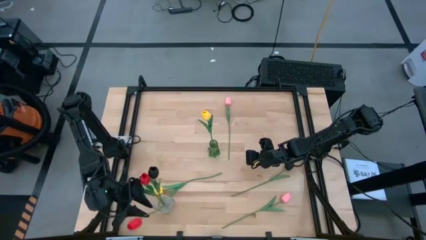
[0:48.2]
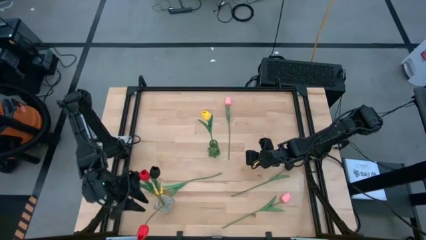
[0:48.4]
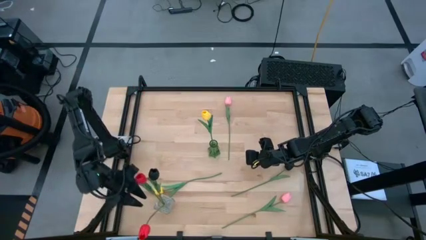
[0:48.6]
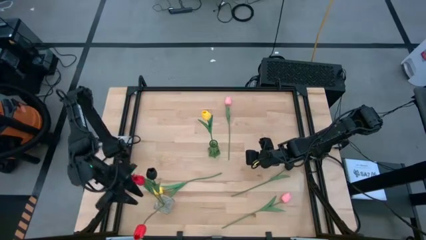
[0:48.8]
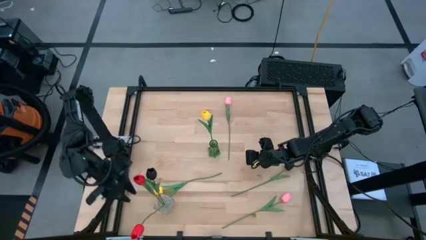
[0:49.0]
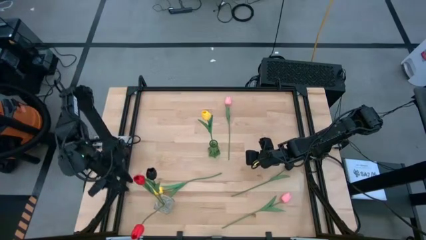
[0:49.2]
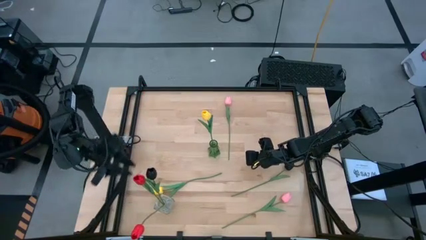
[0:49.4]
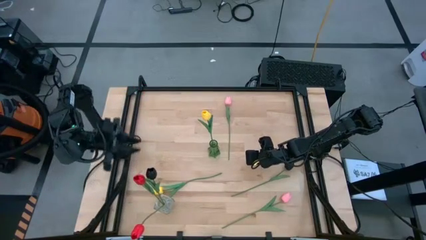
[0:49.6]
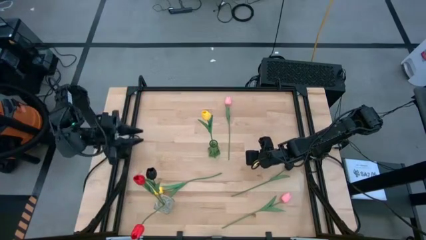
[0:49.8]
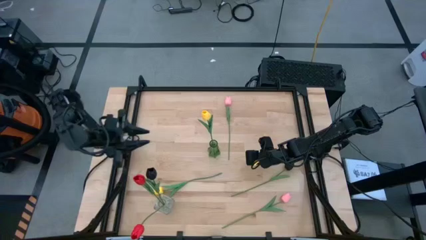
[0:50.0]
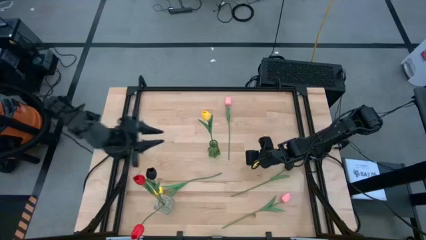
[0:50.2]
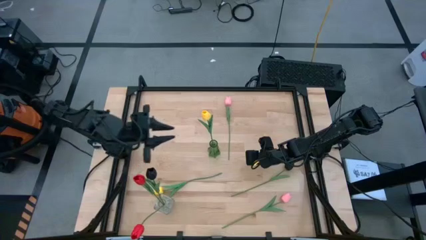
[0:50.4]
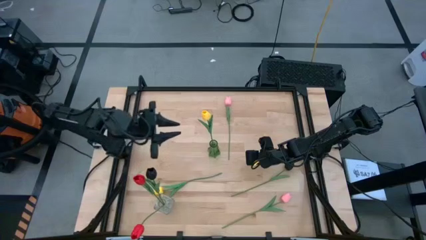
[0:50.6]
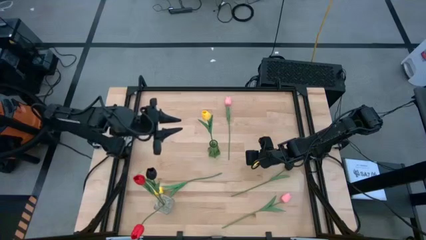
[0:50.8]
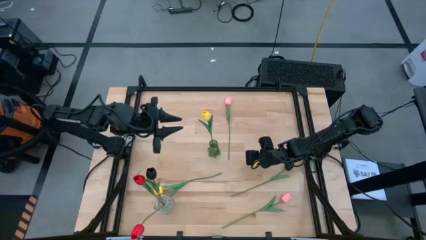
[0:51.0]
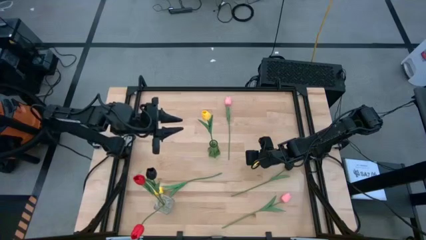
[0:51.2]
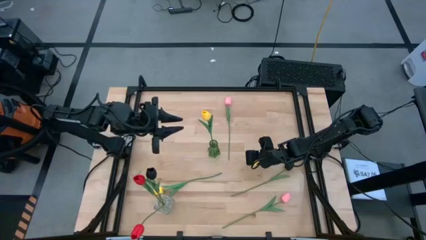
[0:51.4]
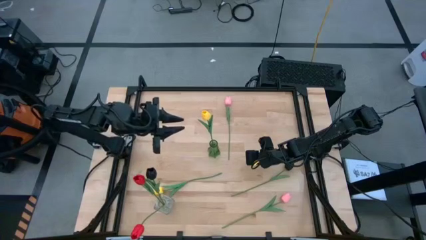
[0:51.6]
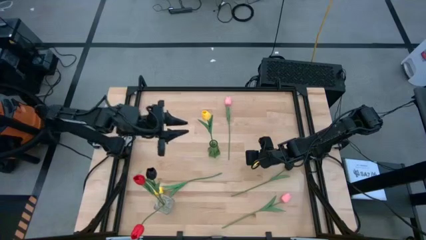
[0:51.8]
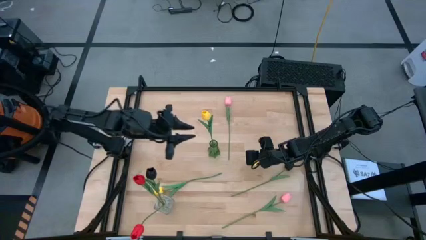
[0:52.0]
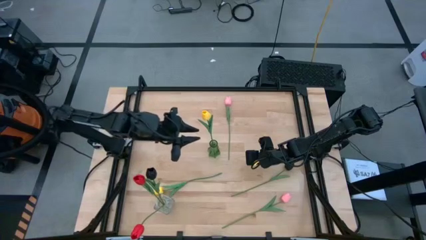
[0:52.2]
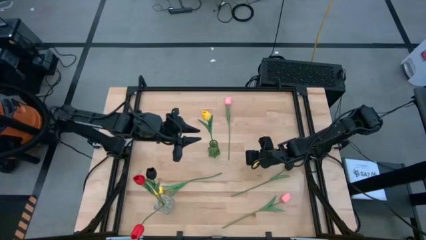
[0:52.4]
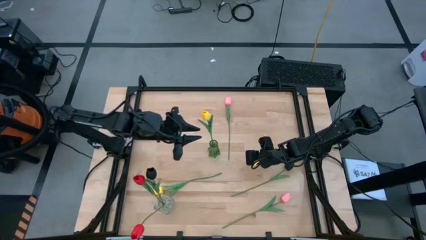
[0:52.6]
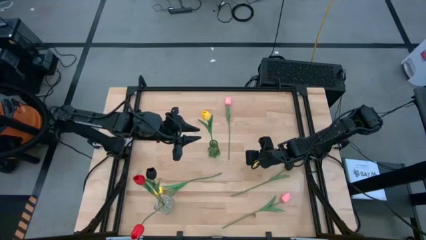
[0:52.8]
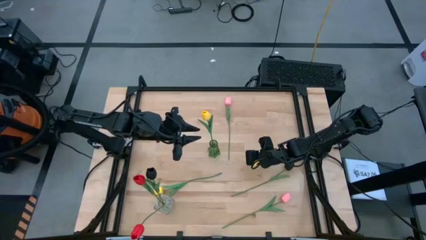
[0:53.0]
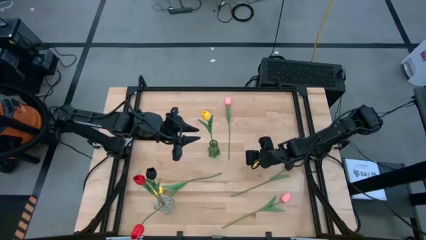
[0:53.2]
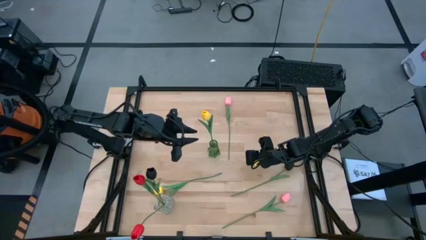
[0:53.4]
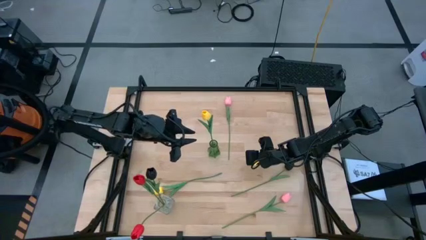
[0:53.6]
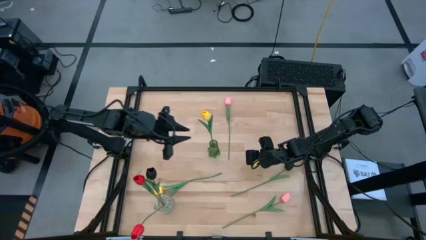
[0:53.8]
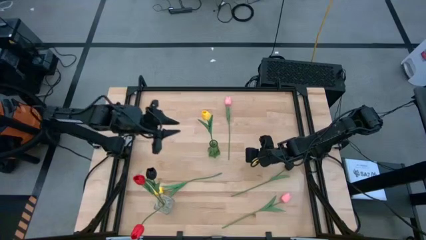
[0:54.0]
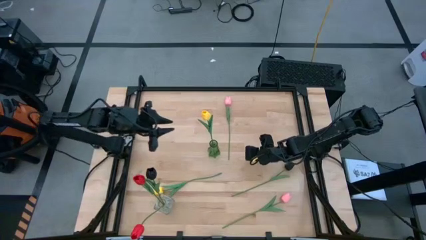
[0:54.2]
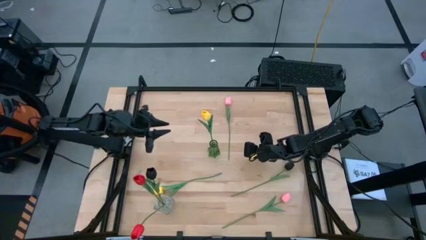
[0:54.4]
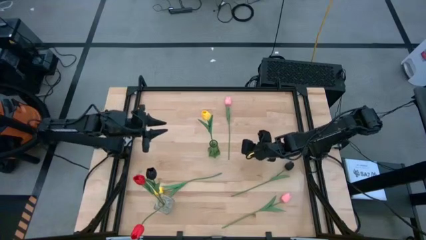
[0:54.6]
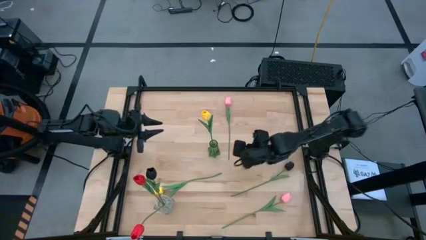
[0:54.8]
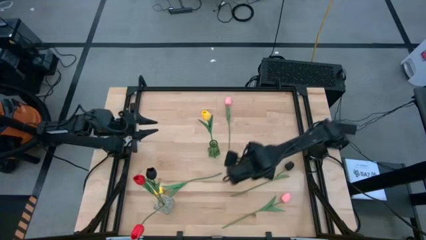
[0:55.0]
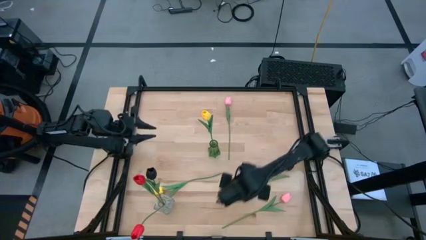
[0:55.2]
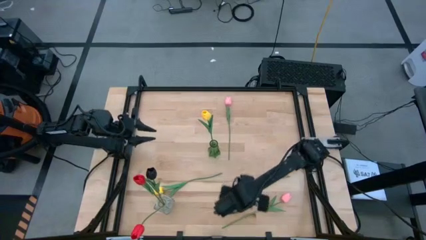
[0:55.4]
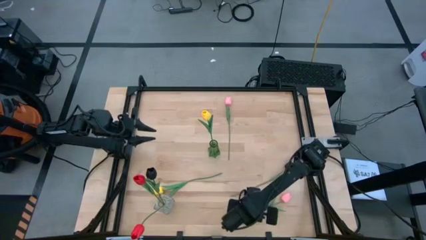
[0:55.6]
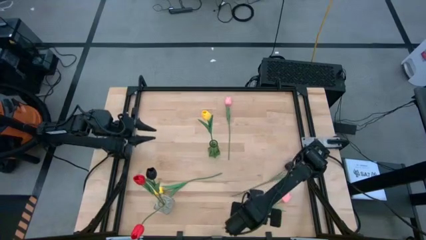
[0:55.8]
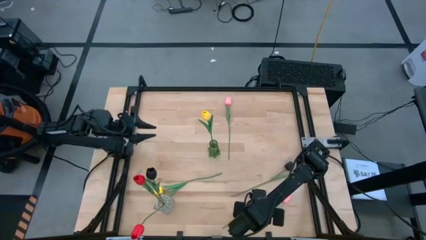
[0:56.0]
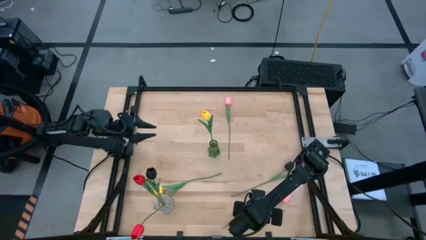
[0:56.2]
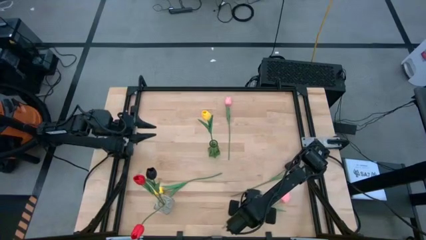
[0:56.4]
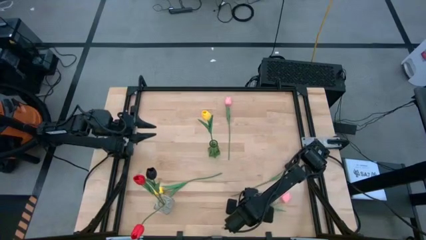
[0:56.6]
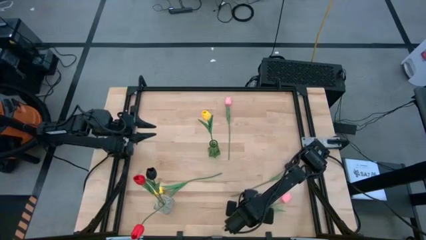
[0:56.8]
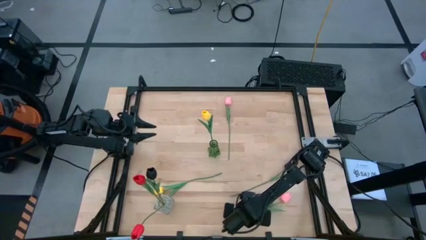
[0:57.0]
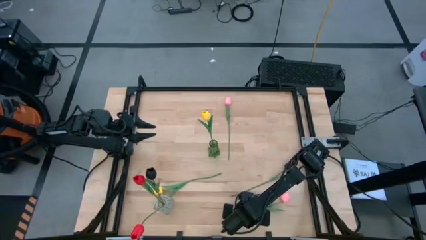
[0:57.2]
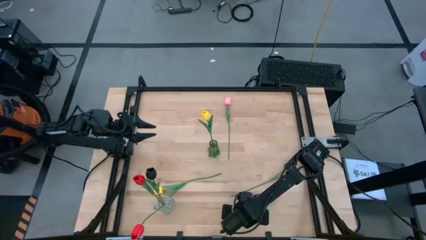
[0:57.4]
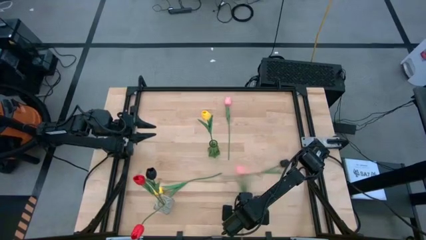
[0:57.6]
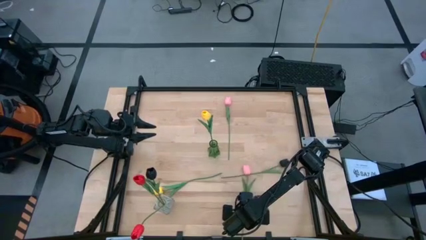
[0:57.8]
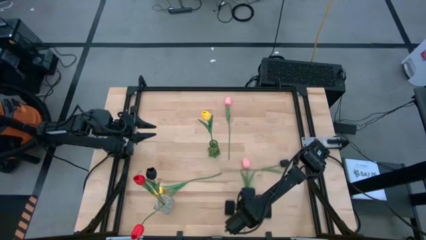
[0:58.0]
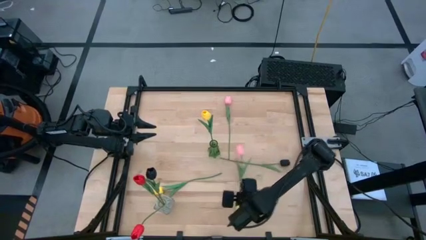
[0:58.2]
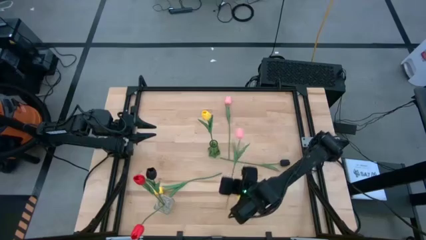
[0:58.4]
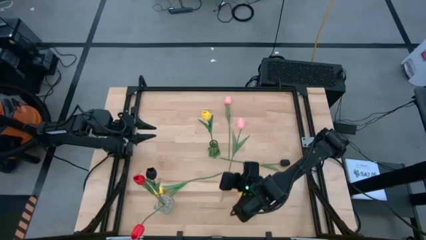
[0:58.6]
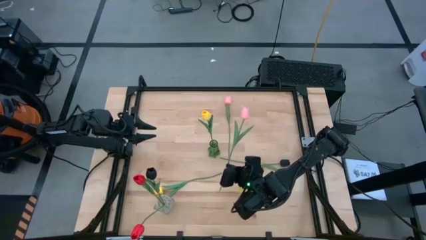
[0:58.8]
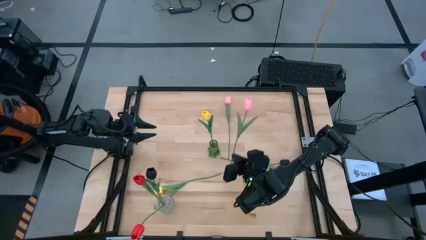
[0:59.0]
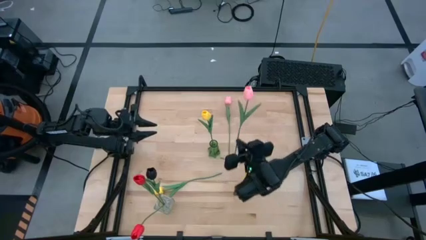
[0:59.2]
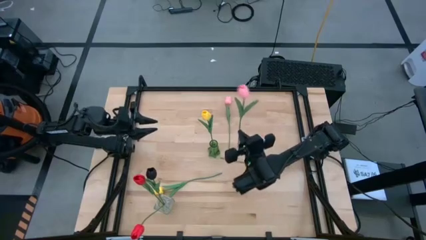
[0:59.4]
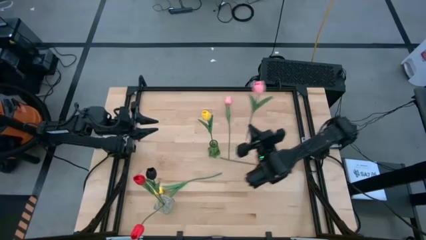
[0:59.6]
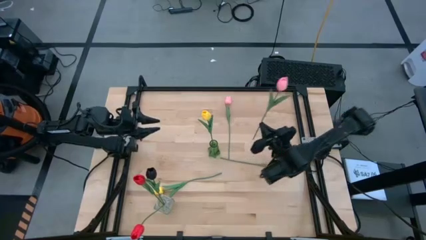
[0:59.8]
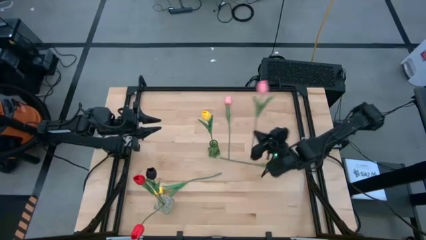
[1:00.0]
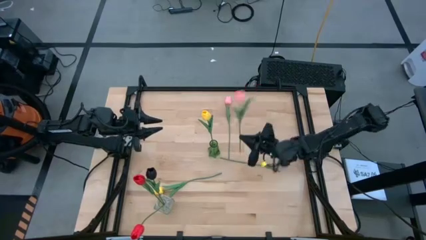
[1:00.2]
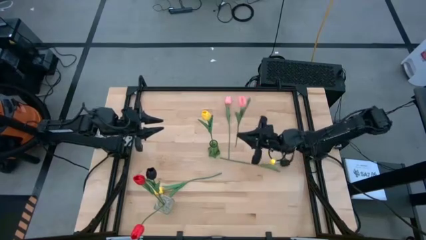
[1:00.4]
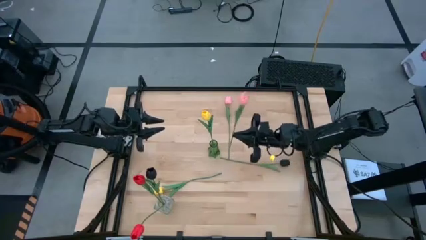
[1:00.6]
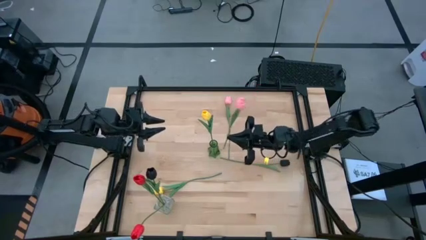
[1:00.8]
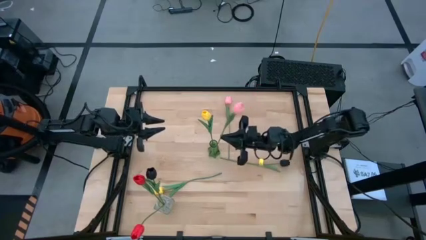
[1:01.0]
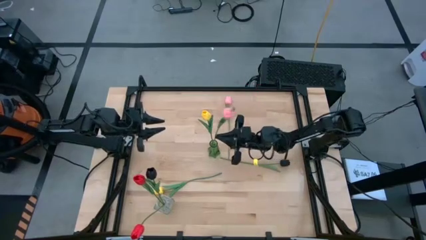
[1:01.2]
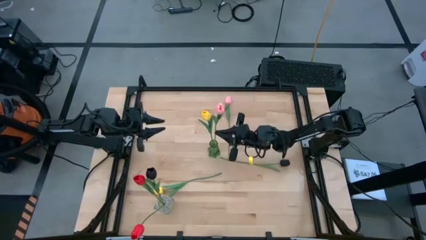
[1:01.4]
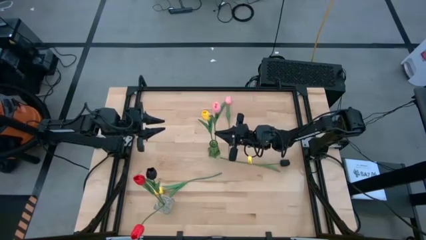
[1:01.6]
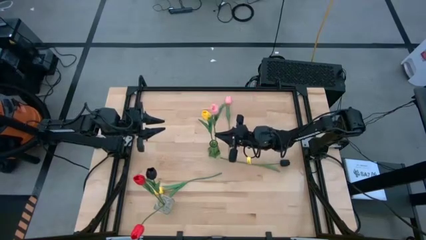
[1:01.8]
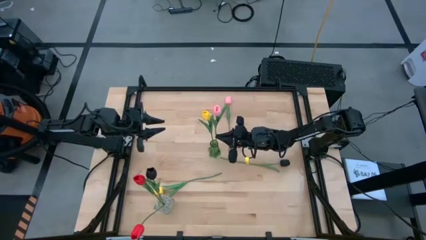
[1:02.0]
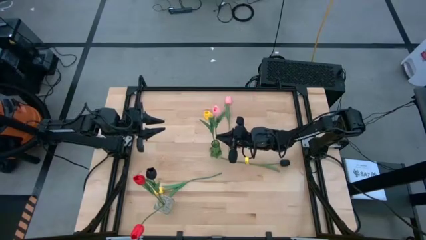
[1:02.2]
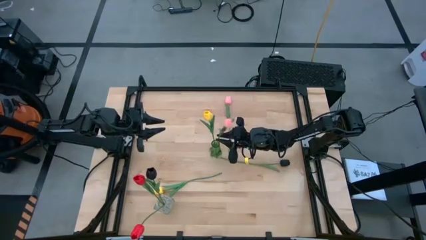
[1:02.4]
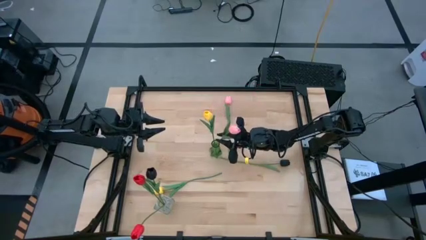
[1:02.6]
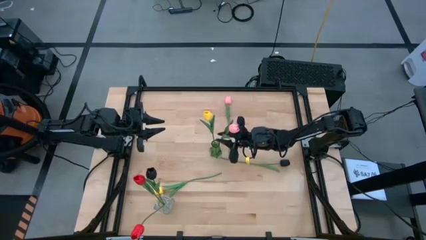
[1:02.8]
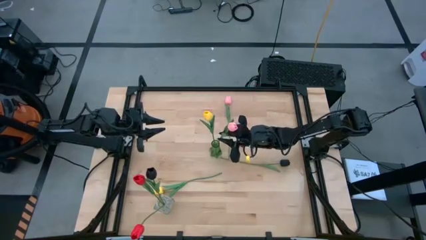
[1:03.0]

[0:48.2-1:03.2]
Task: Sort flowers into vase by color
Put the bottom pink tulip into the green vase

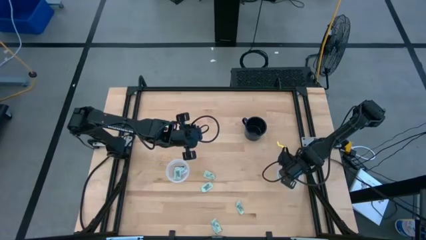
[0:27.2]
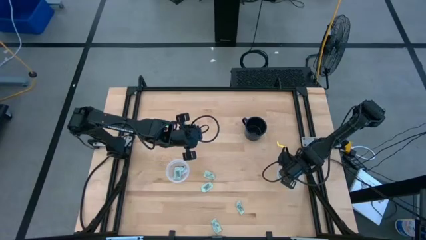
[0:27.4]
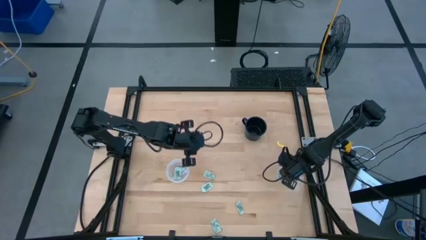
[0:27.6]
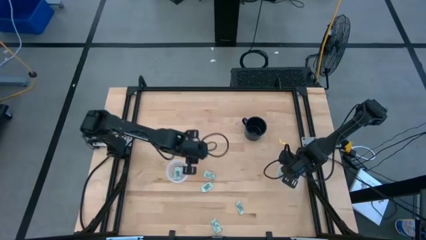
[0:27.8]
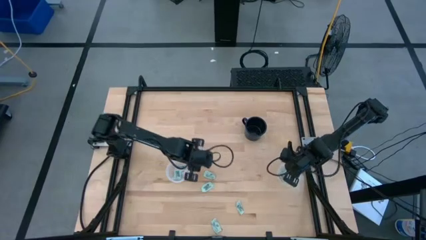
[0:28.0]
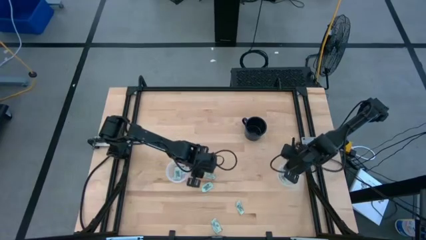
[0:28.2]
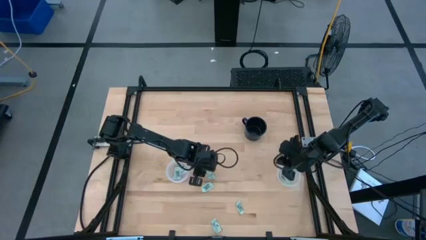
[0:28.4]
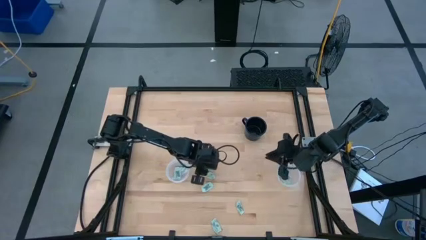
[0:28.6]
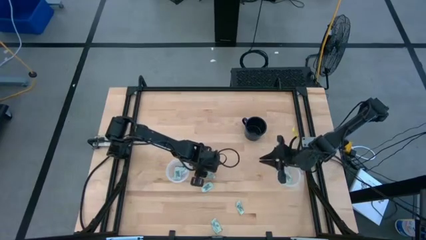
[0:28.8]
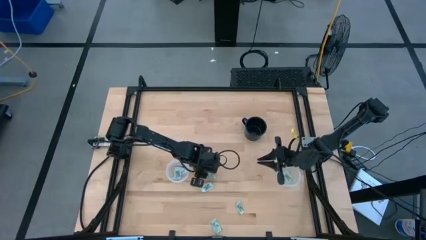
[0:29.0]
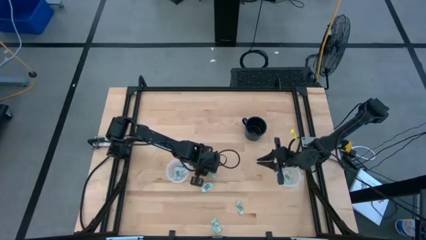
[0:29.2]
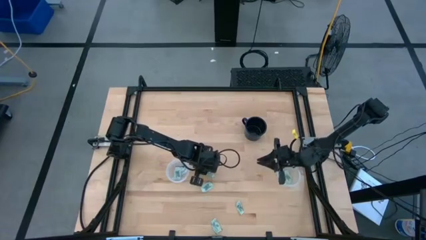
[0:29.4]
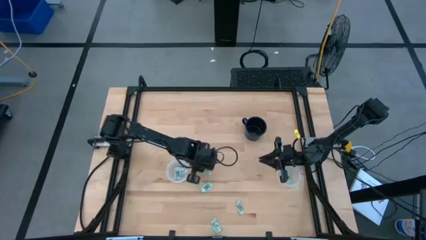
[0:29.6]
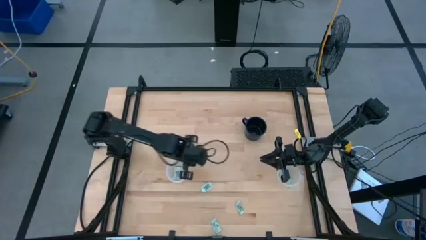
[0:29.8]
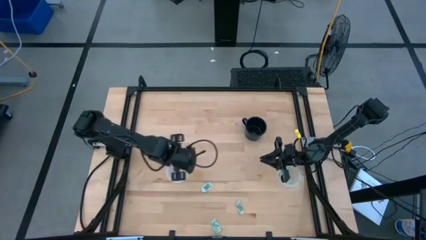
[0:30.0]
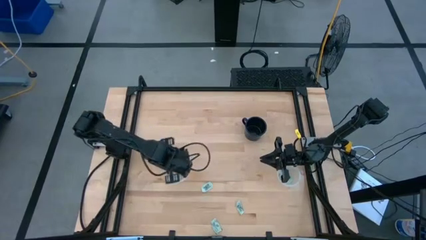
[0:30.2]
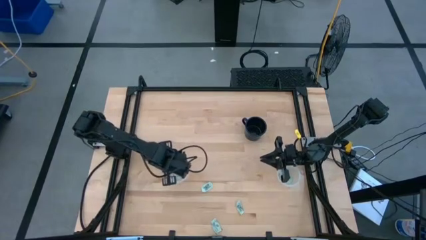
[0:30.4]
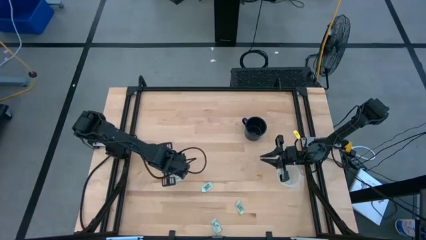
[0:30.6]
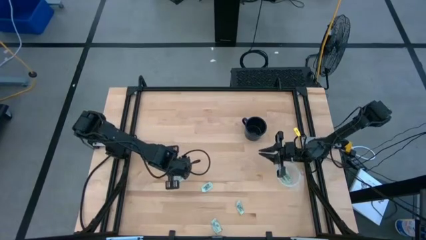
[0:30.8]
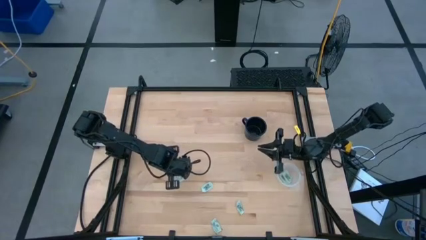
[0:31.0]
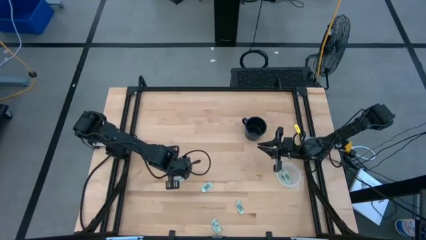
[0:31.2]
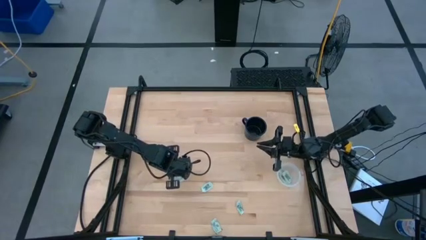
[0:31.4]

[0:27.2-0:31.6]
Task: Pick and place Stevia / Truvia into bins
Put the stevia packet into the left transparent plastic container
